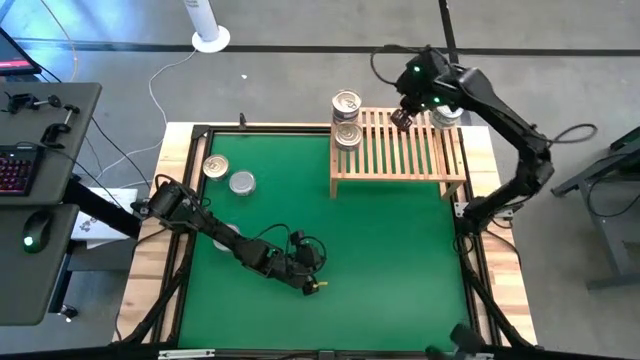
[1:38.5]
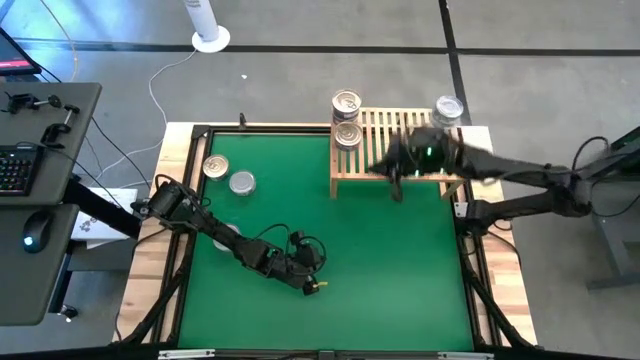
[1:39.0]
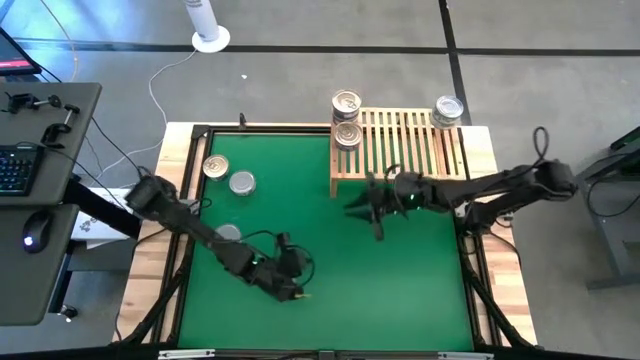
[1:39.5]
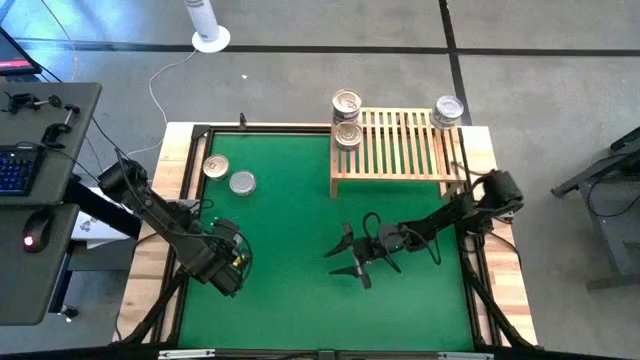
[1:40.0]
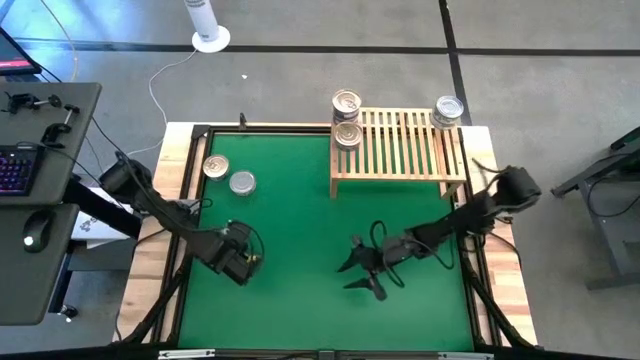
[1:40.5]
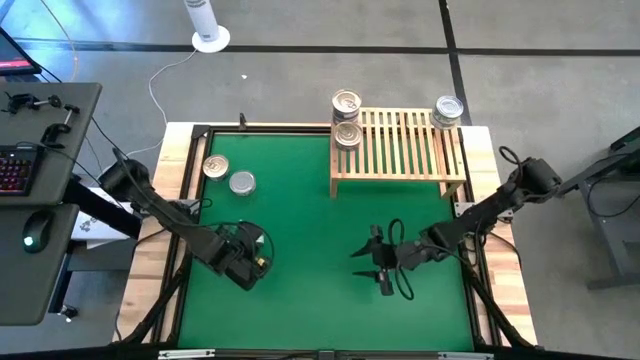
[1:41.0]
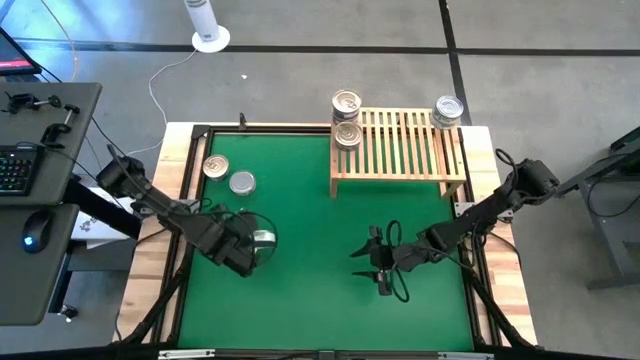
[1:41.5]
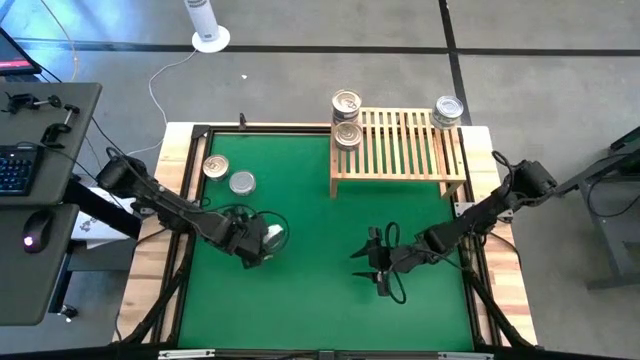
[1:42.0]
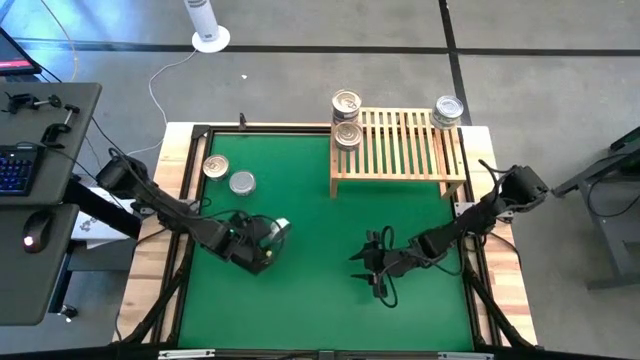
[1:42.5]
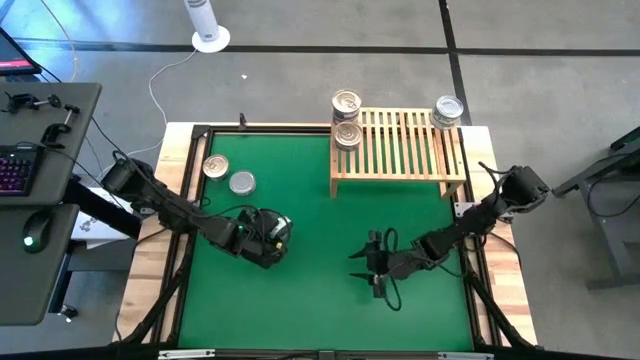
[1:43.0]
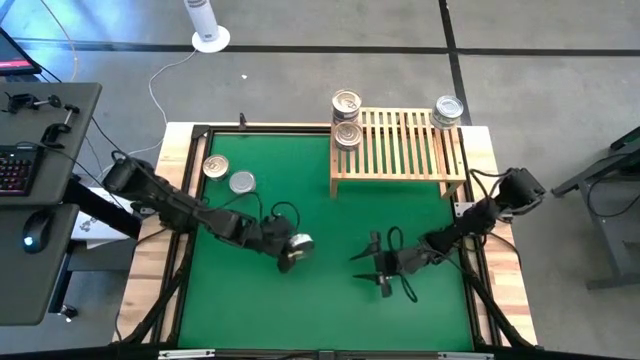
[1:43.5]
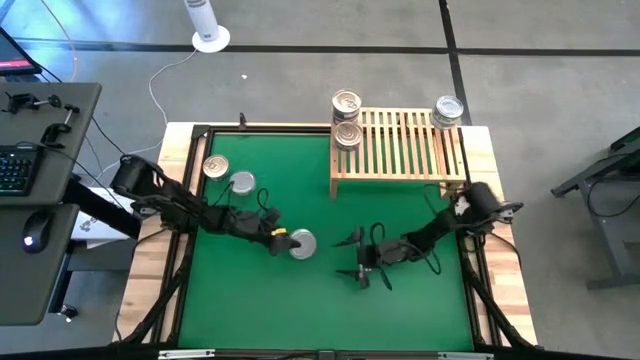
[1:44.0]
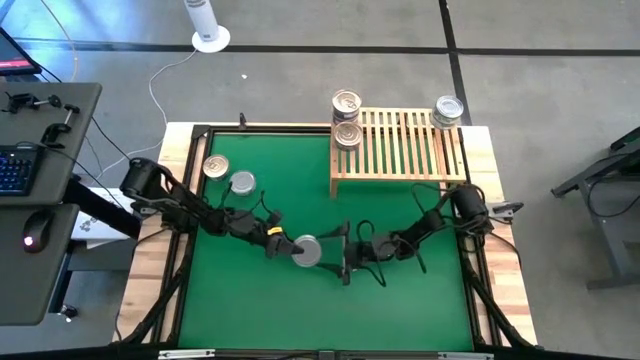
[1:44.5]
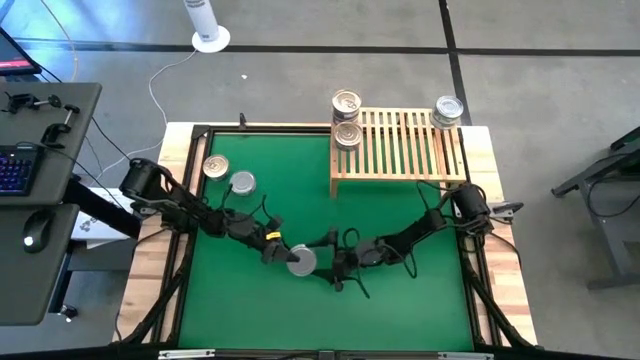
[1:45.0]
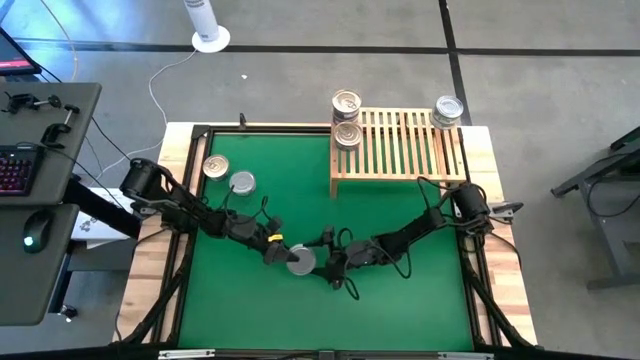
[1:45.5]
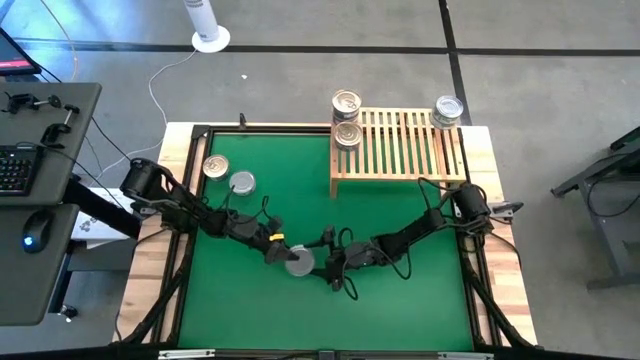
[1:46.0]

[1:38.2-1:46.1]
Task: Stack canned seafood by type on shelf
Put the green tuna can on the shelf

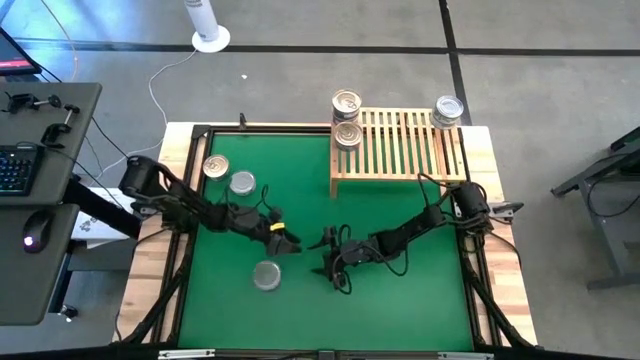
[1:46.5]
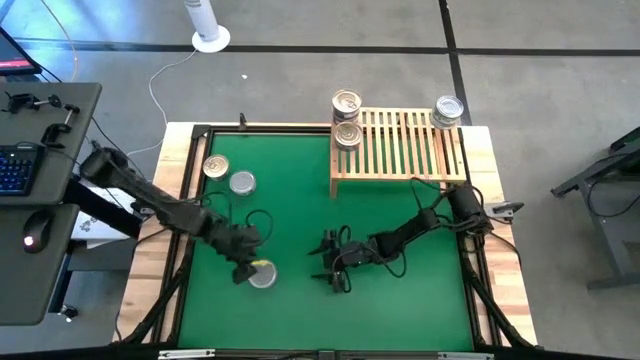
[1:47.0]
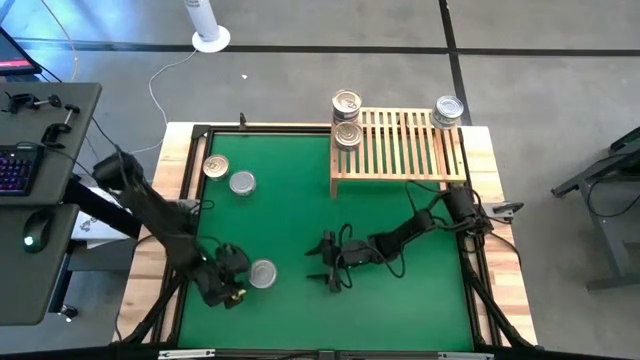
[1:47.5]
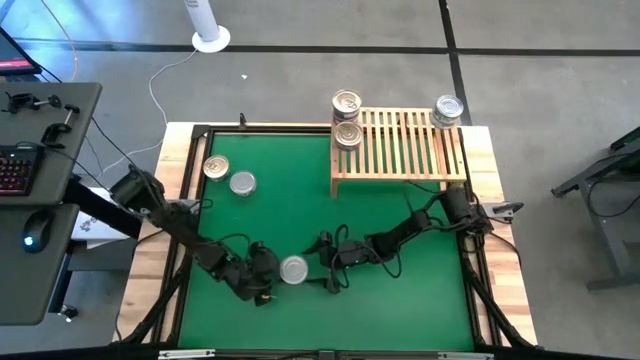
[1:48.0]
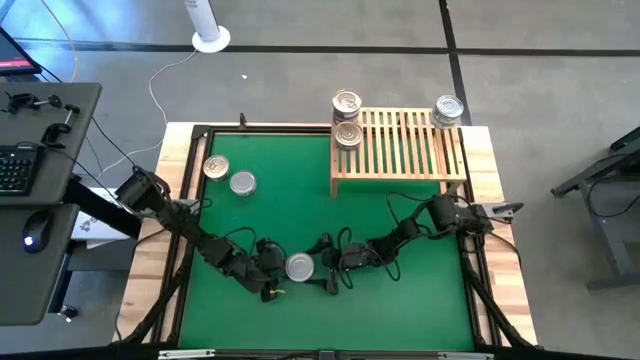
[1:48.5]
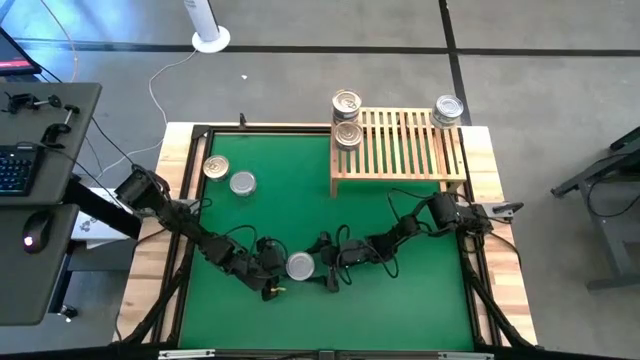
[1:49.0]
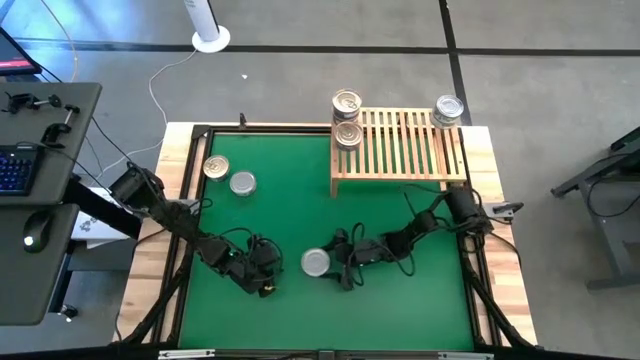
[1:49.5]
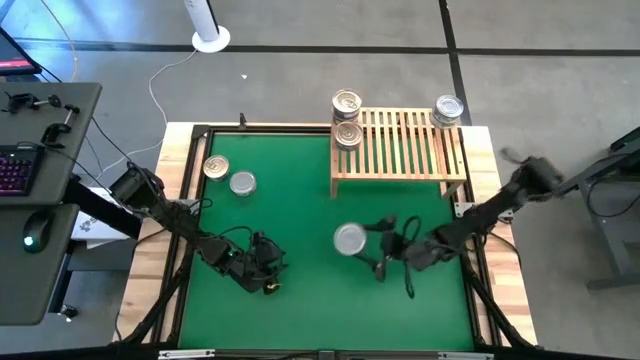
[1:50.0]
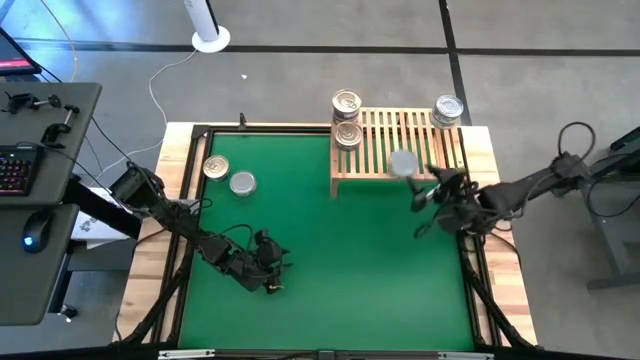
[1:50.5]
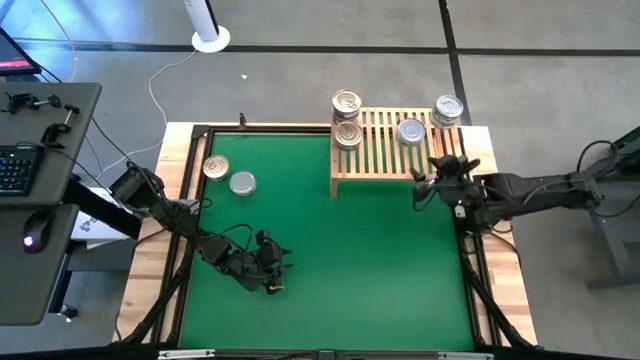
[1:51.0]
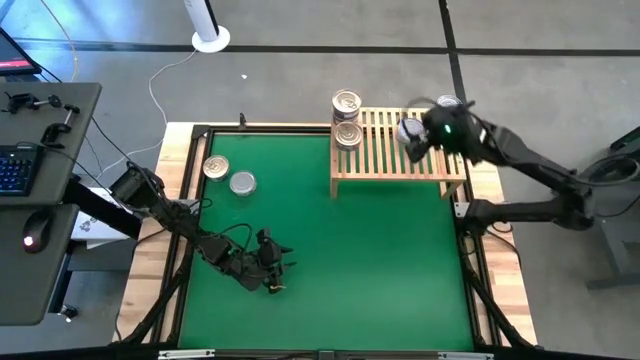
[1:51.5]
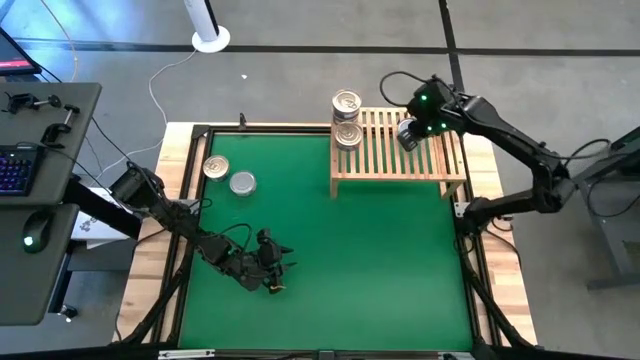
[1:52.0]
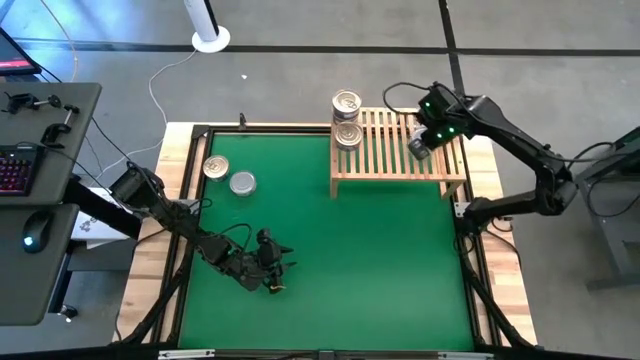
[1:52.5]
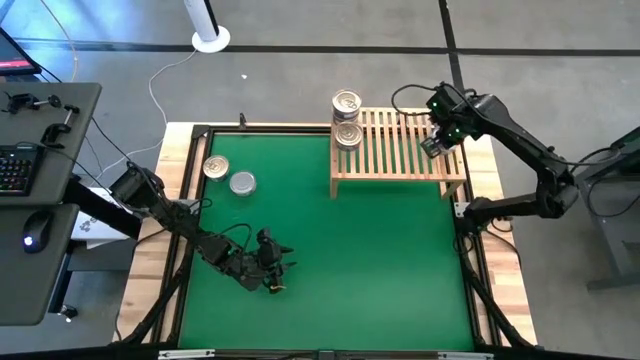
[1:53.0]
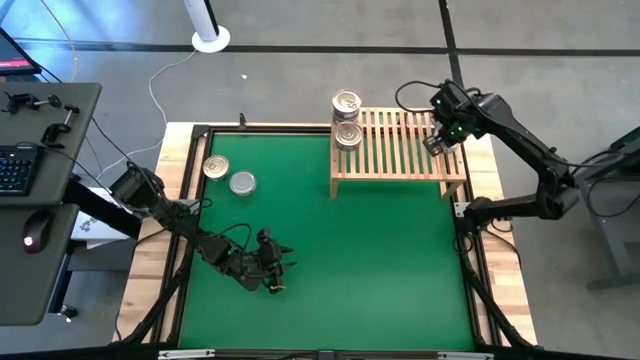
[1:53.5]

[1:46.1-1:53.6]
Put the green tuna can on the shelf aligned with the stacked green tuna cans

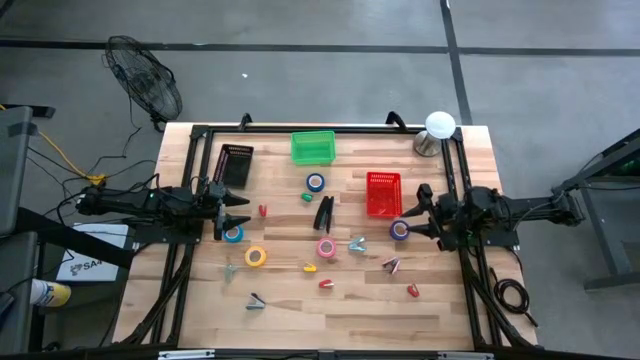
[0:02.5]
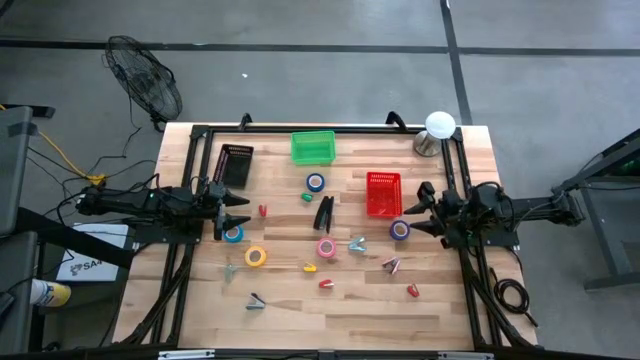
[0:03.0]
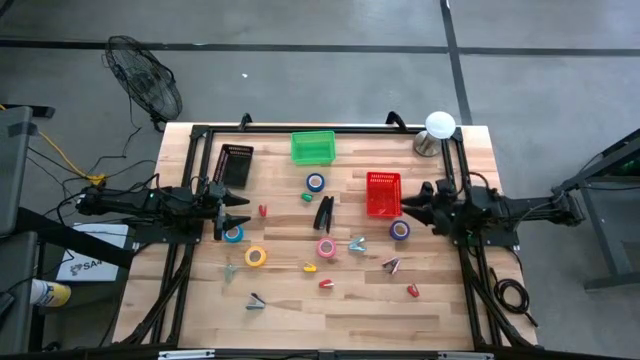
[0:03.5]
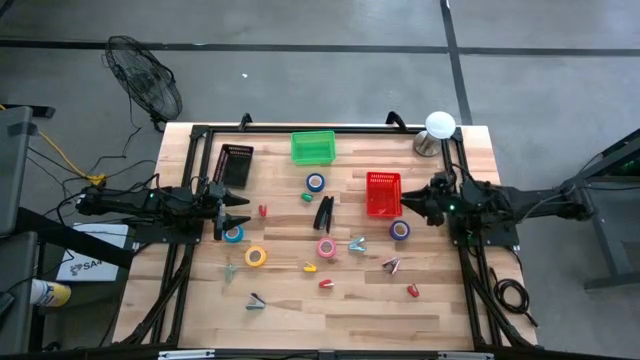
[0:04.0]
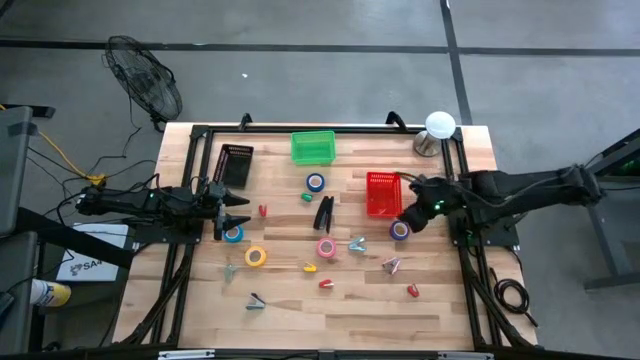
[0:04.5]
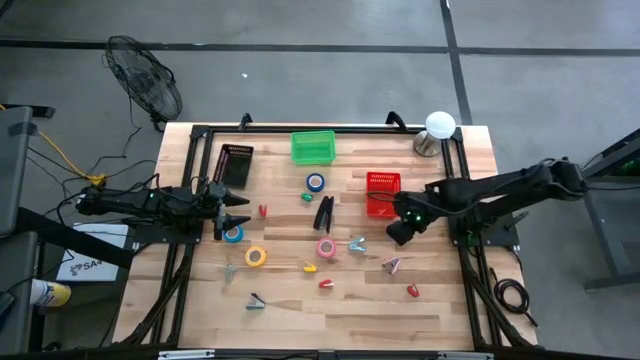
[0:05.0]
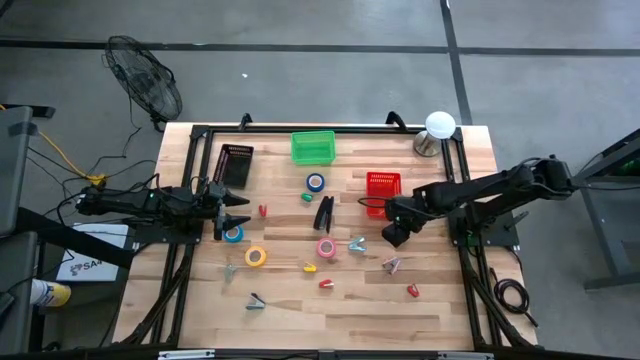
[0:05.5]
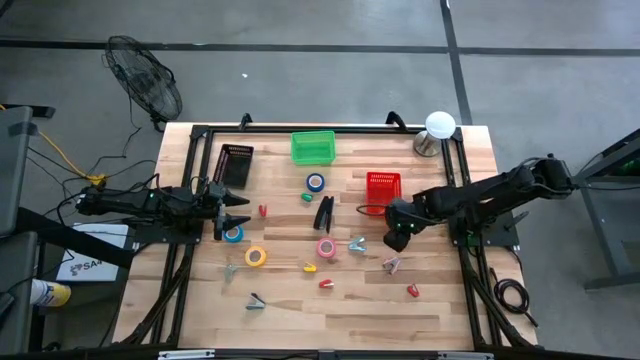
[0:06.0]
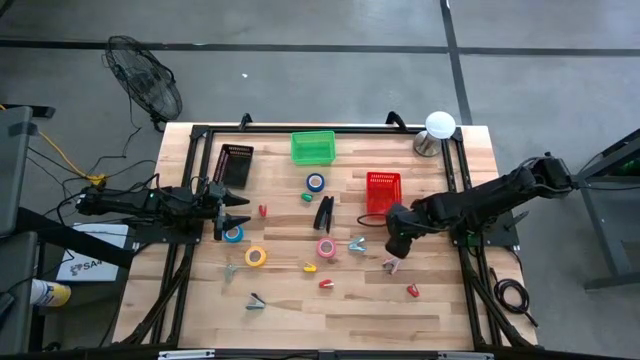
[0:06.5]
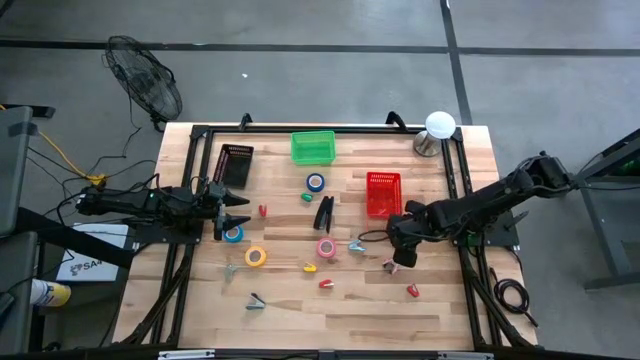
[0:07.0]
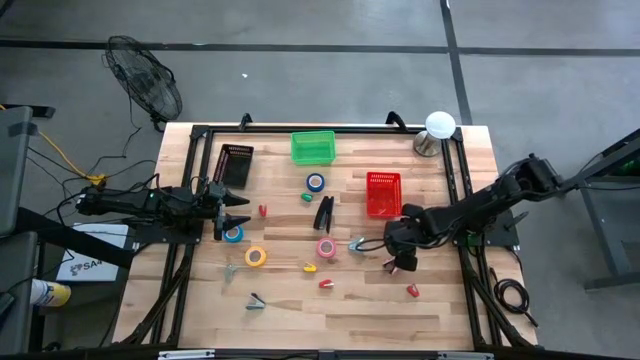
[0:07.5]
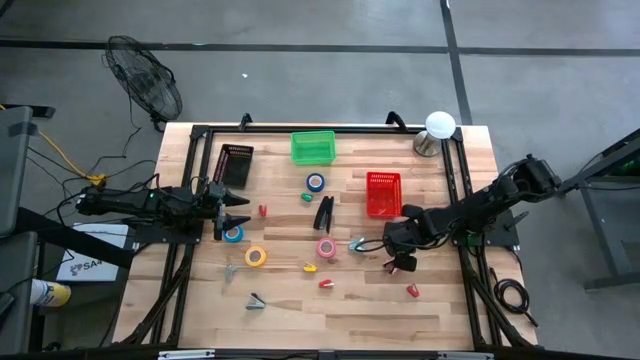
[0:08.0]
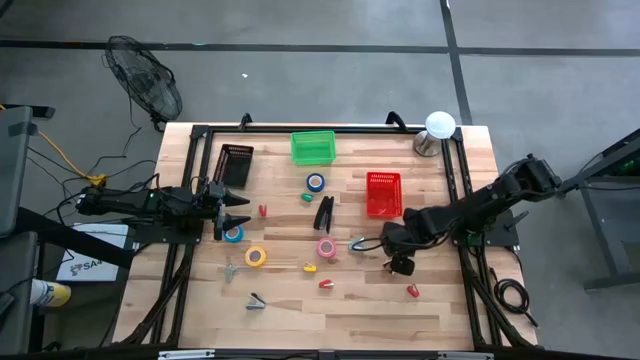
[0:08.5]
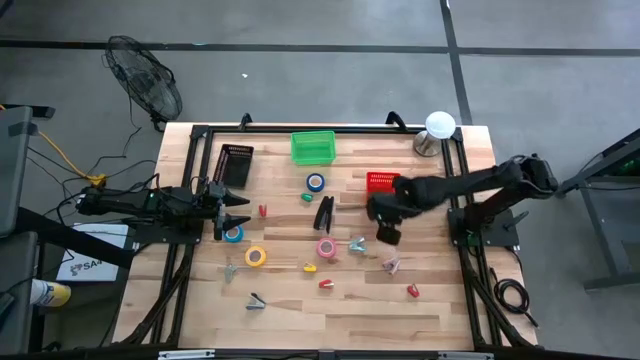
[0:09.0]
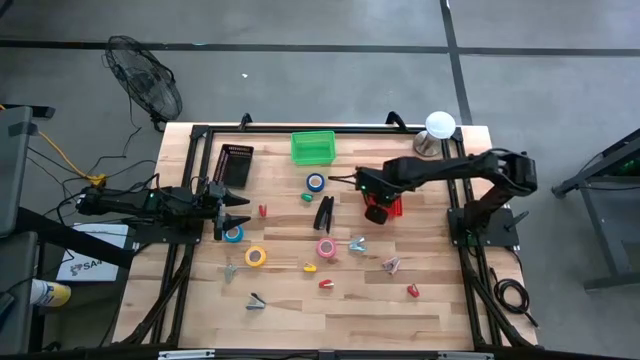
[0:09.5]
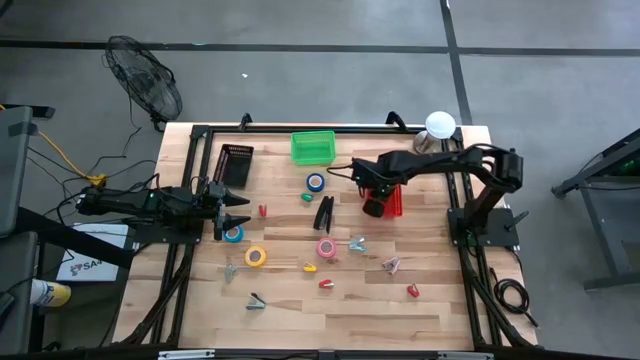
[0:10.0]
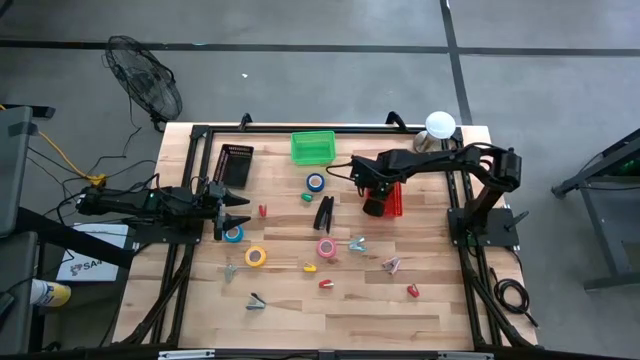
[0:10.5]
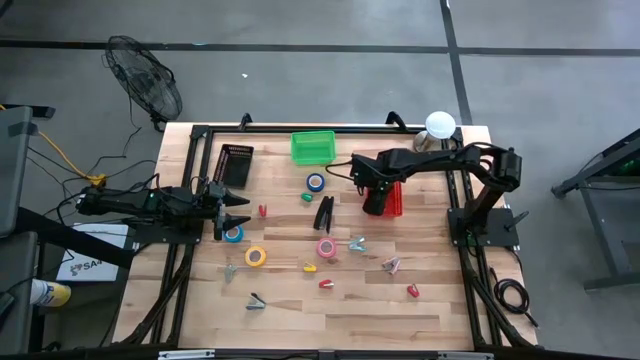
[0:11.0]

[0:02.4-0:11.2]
Task: Pick and place Stapler, Stapler remover, tape
Put the bottom dark blue tape into the red bin
